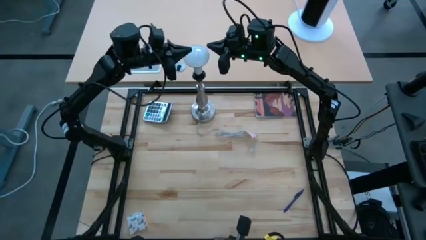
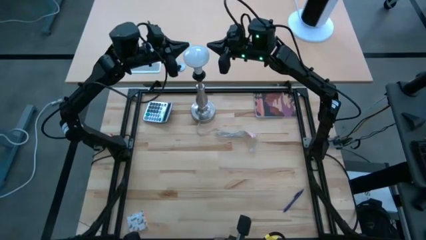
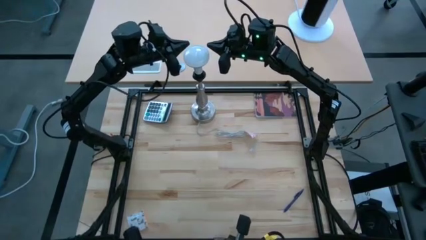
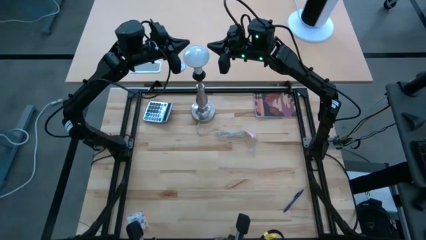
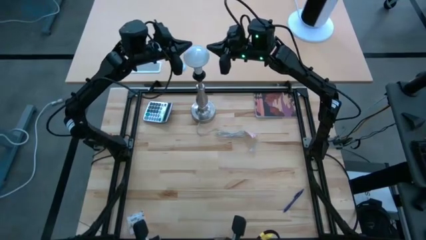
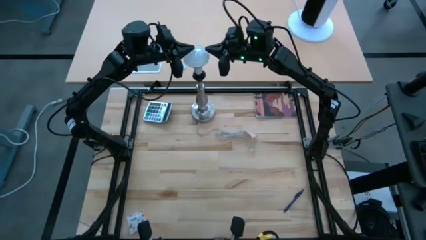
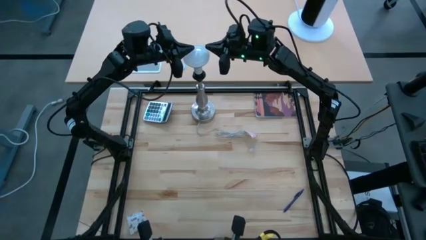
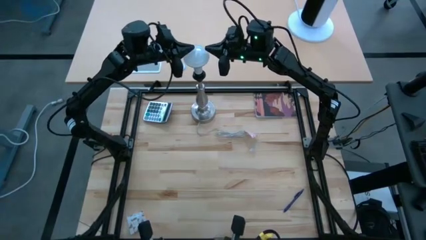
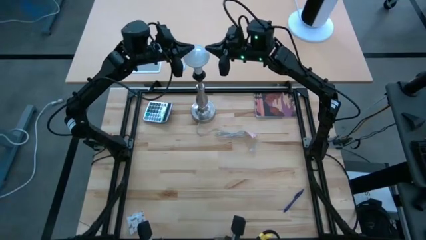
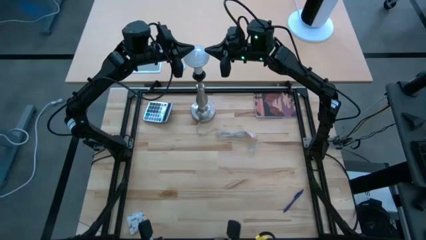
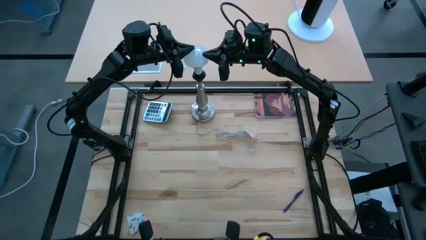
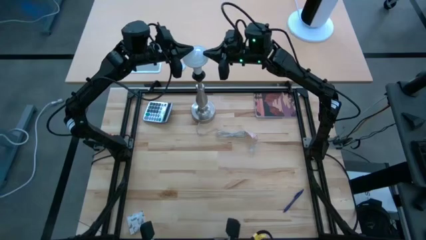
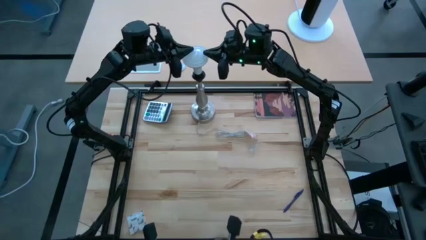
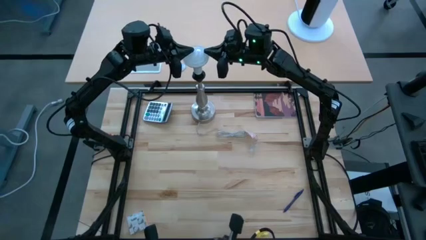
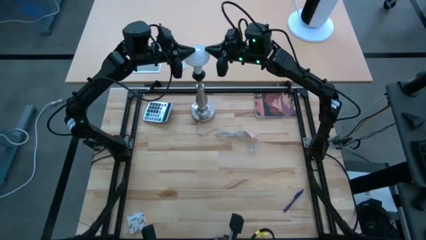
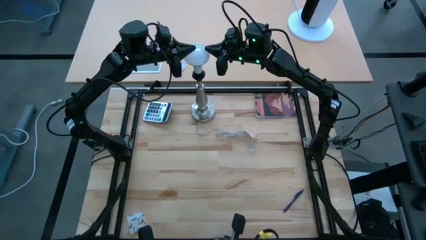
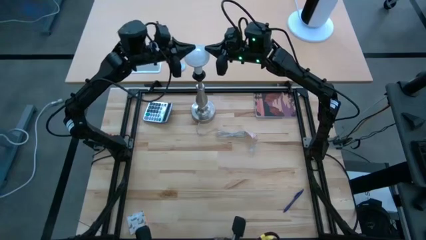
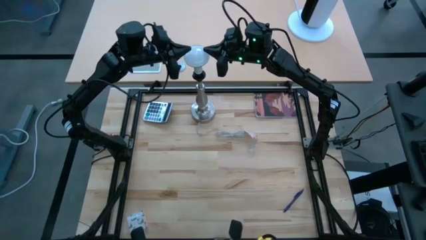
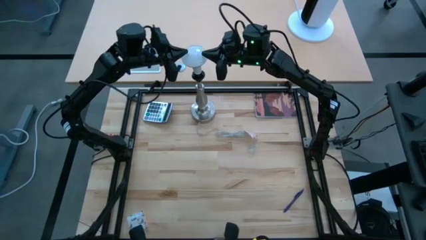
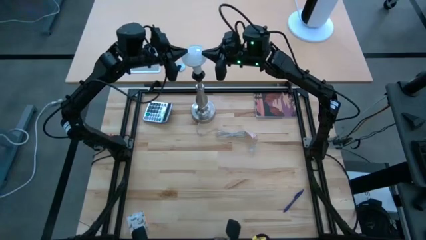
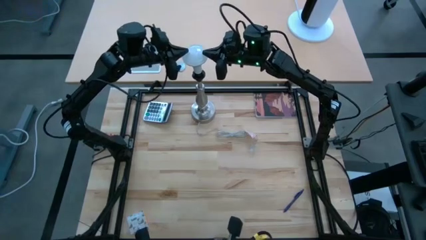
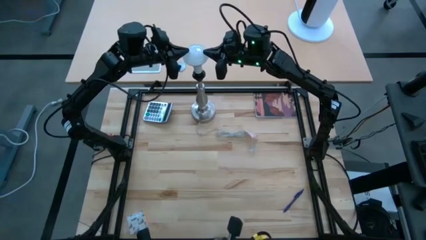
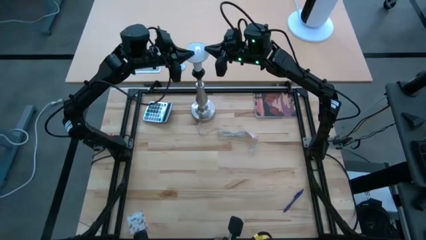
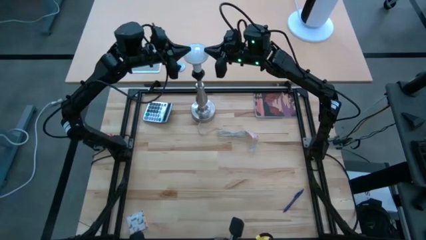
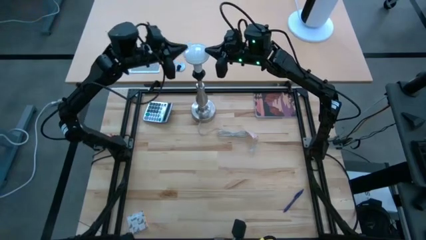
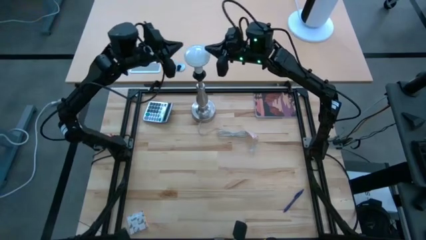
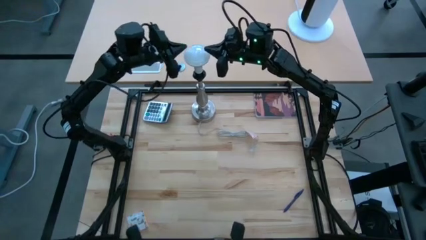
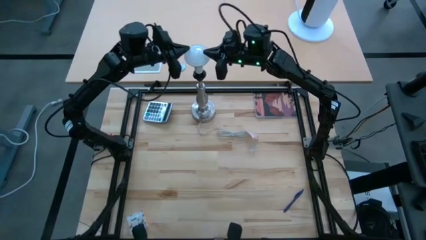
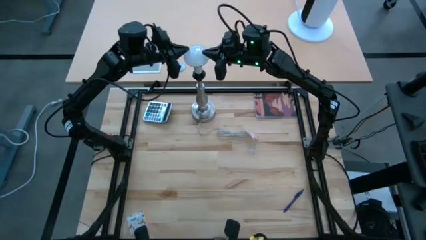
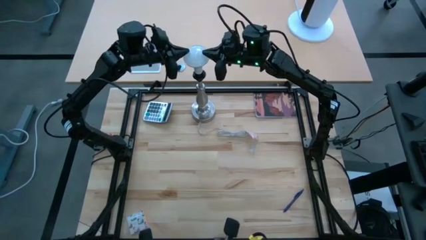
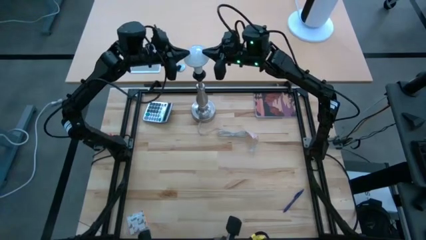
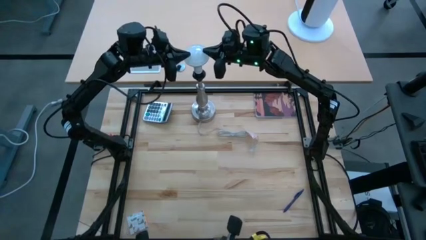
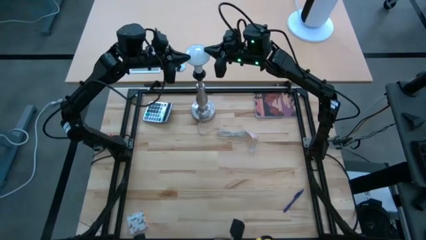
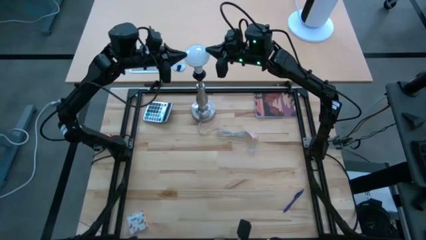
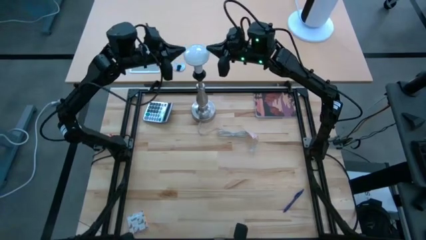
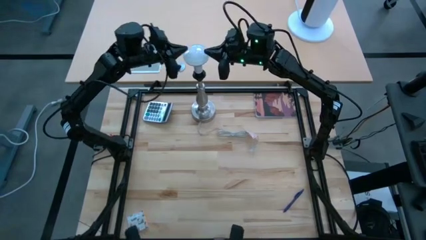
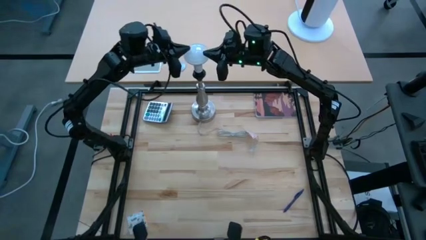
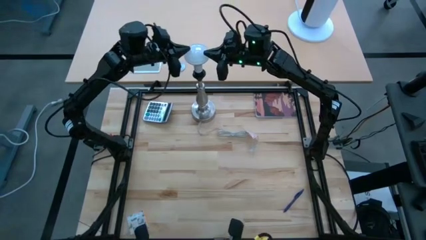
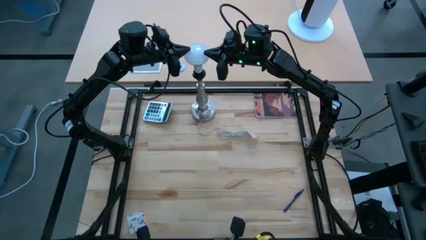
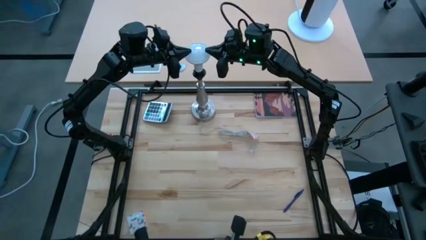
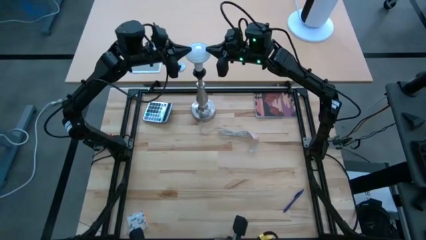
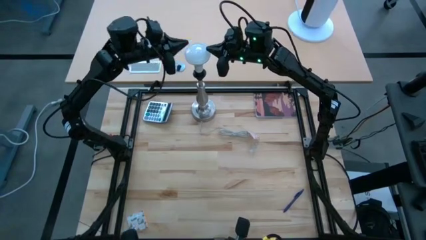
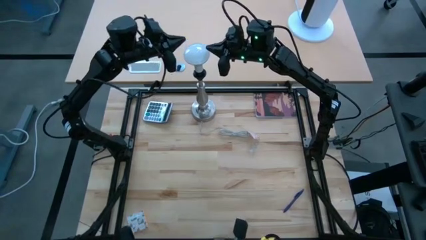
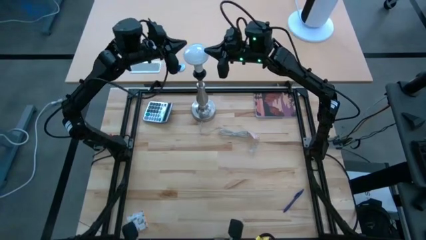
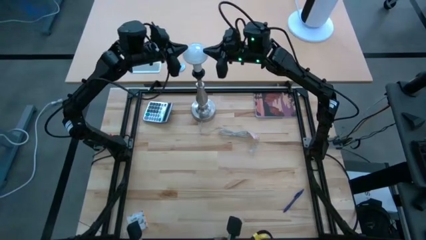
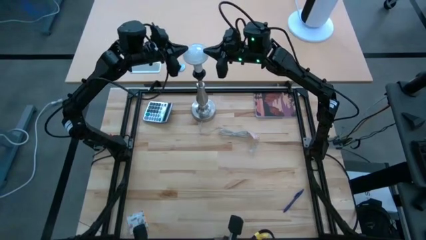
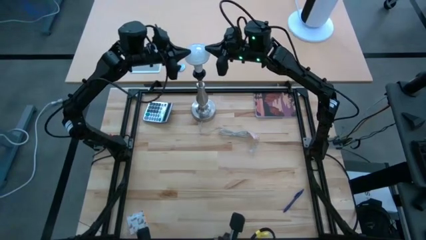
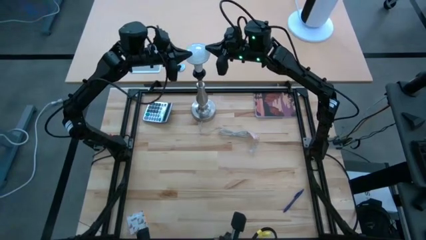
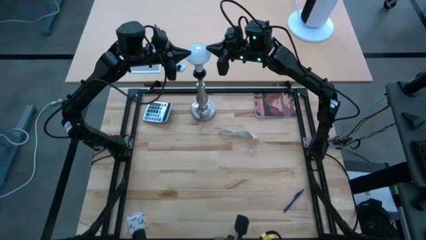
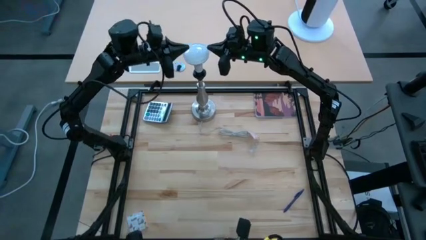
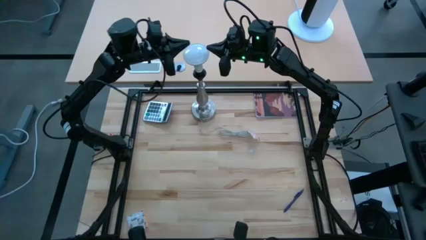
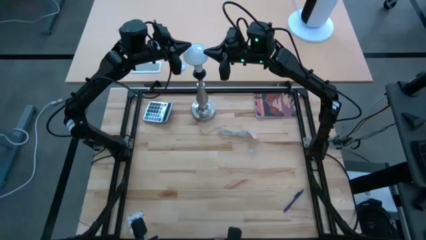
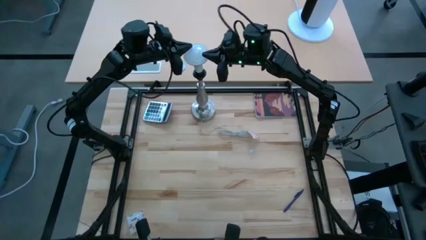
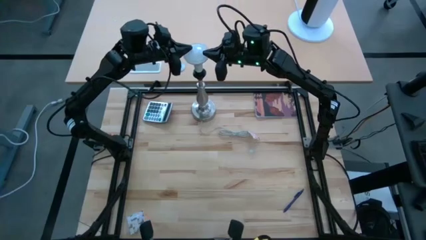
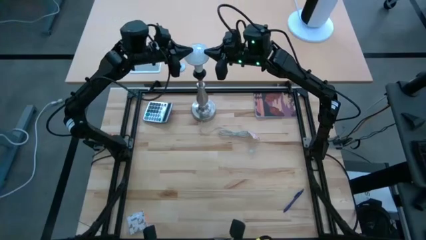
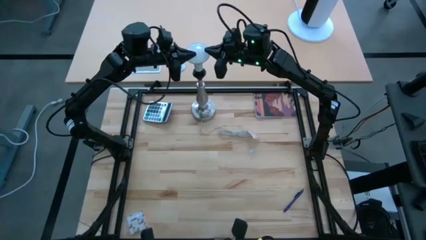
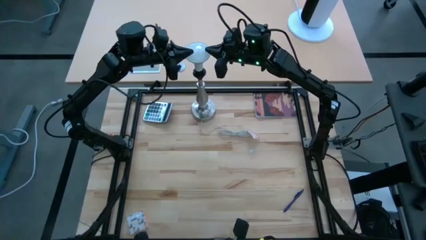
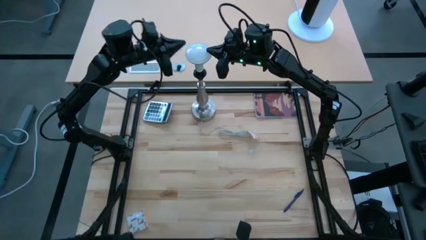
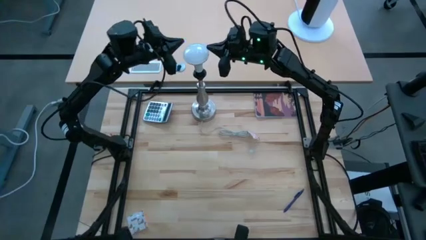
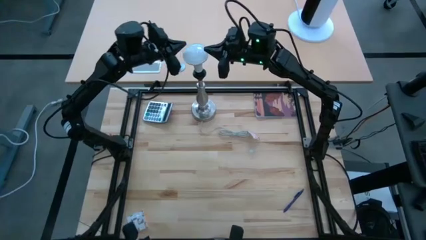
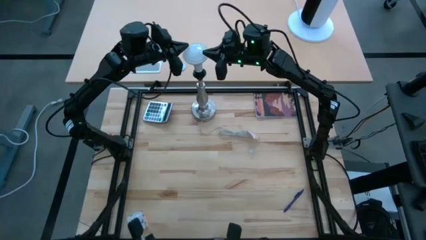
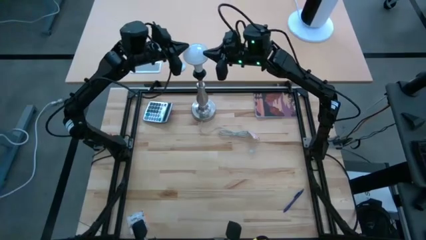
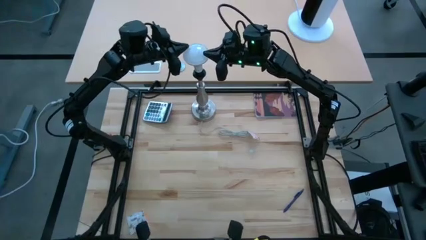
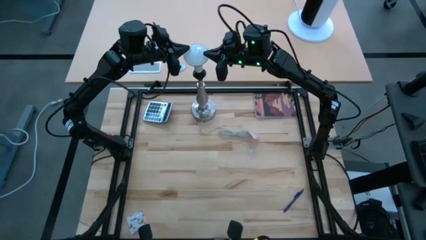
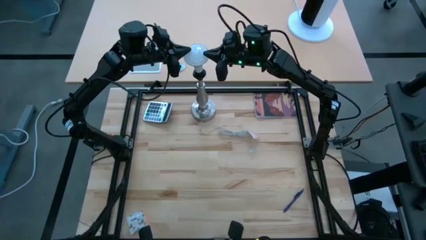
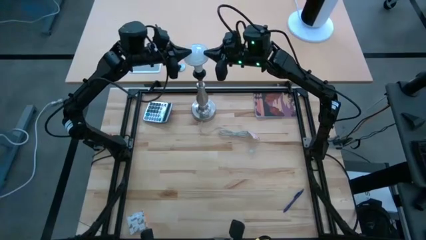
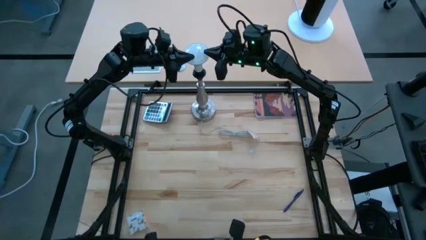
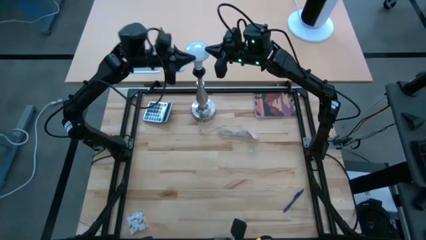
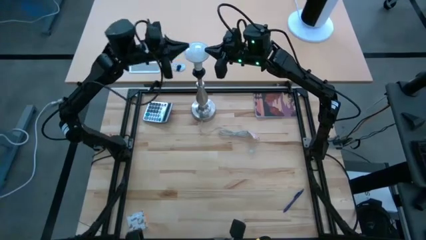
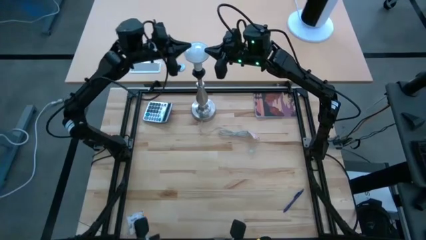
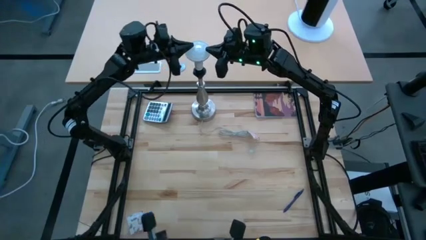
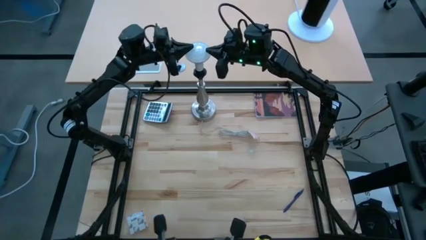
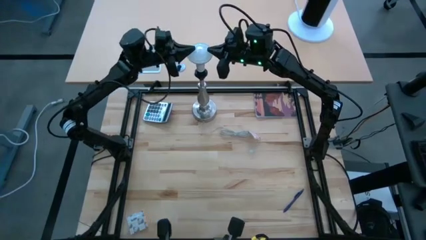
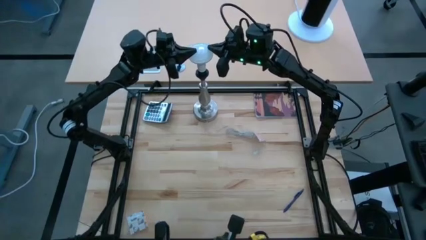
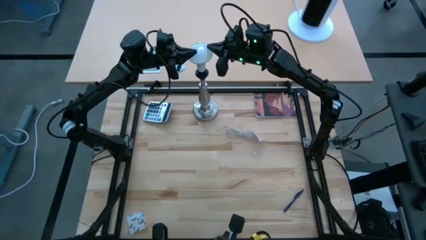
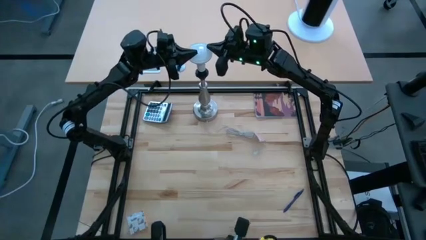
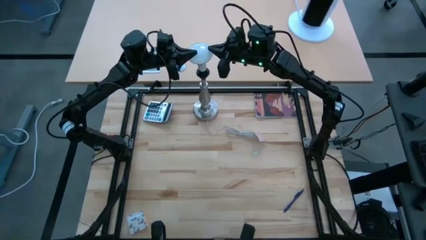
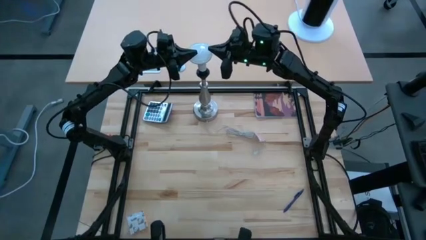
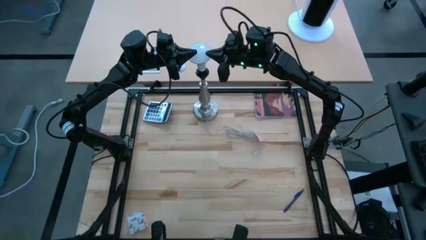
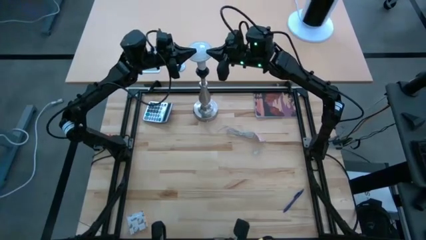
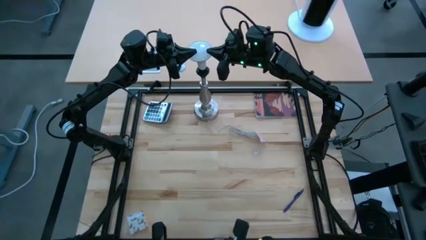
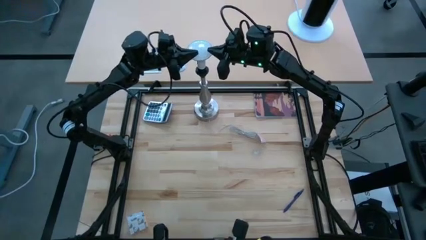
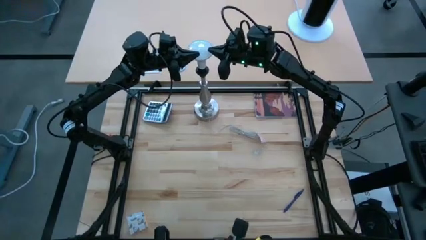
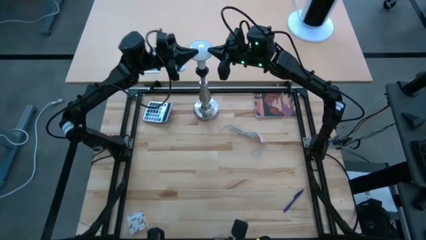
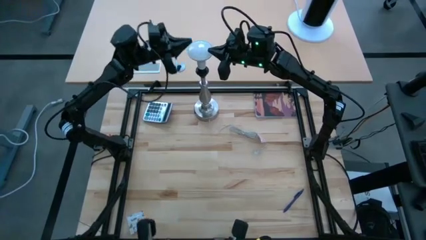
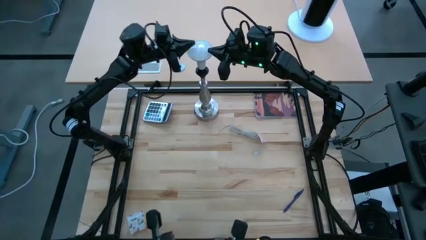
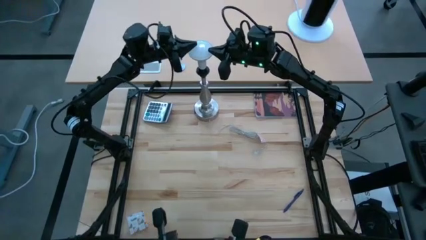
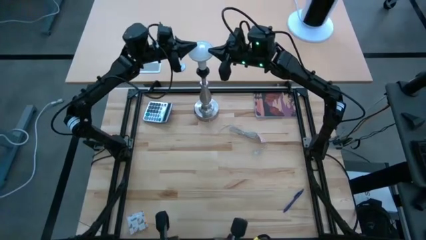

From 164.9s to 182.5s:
Task: Screw lightbulb
Remove the lightbulb from the table lamp
